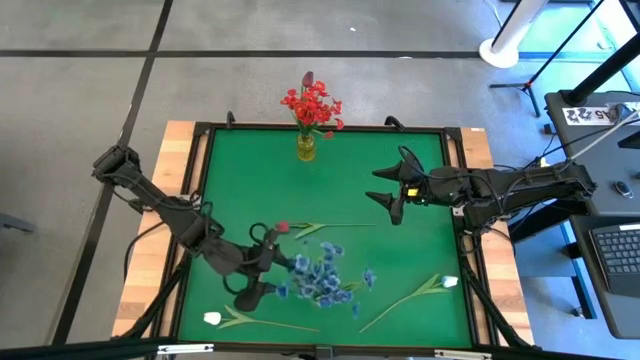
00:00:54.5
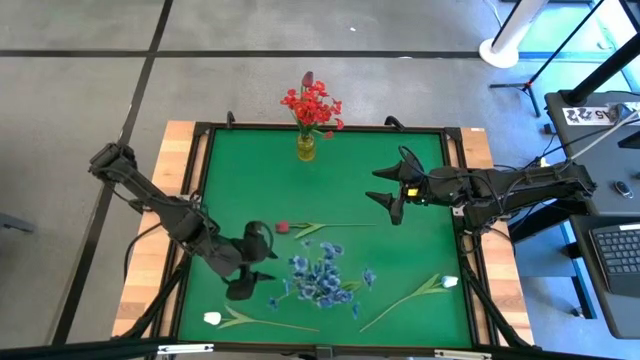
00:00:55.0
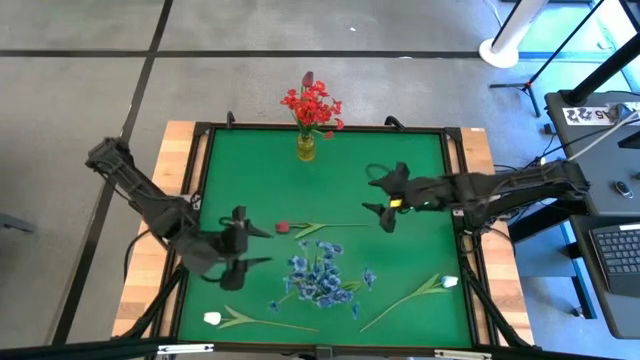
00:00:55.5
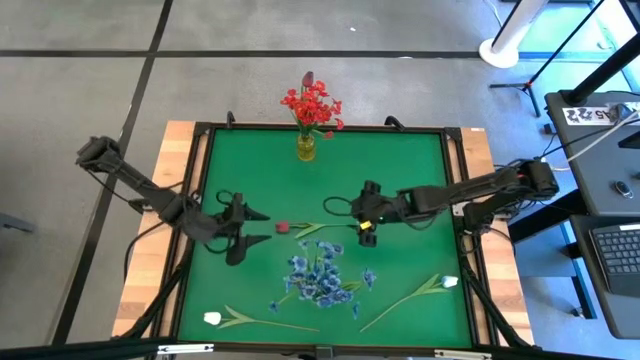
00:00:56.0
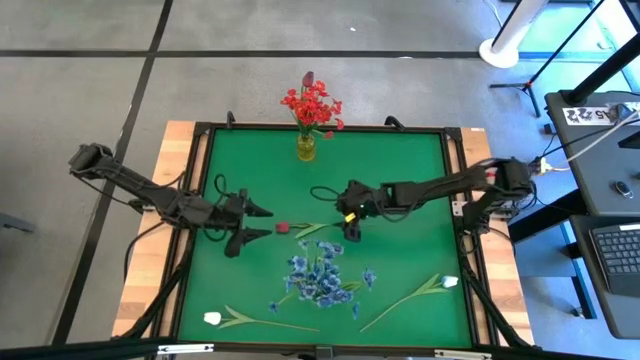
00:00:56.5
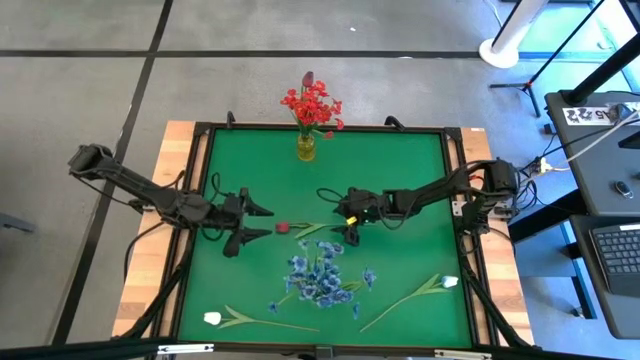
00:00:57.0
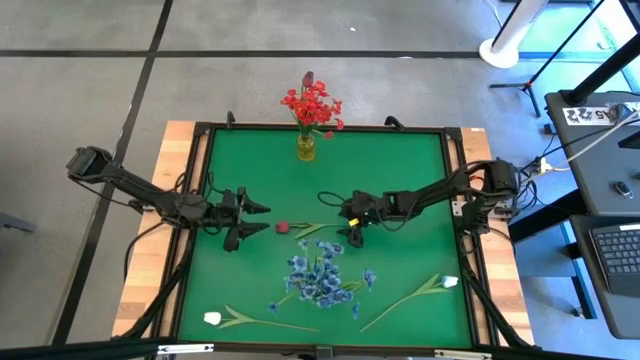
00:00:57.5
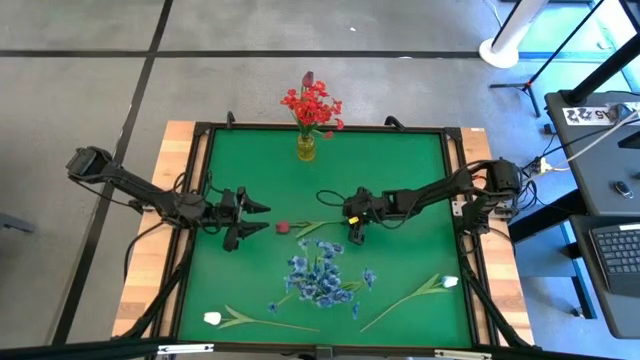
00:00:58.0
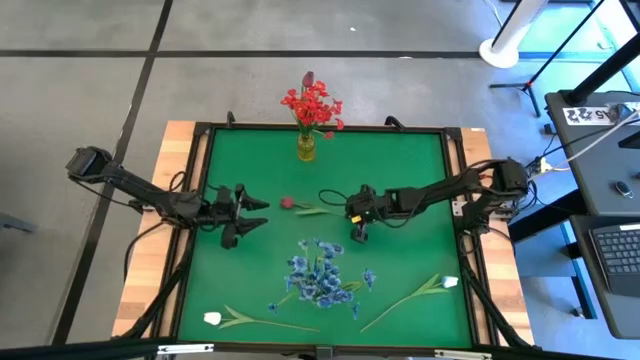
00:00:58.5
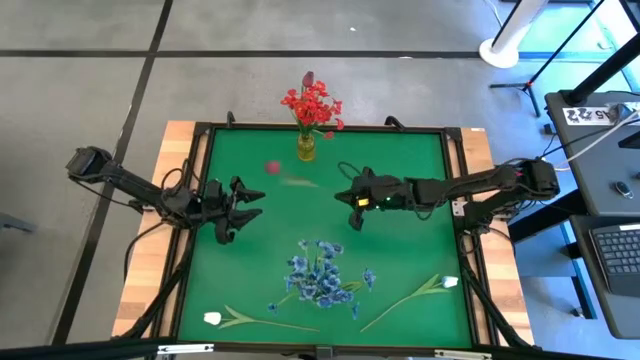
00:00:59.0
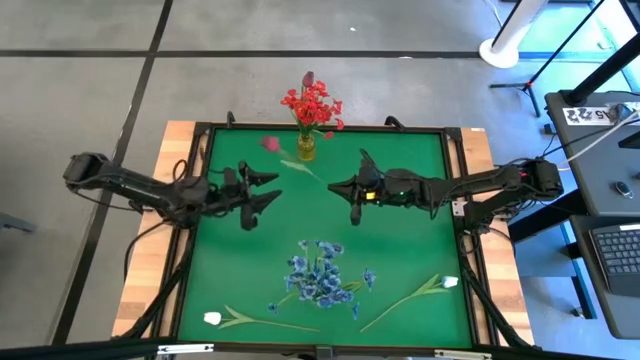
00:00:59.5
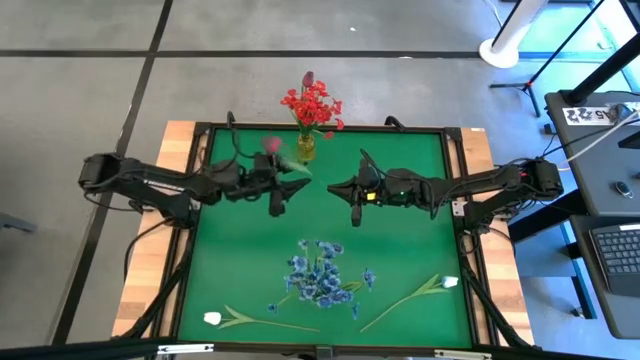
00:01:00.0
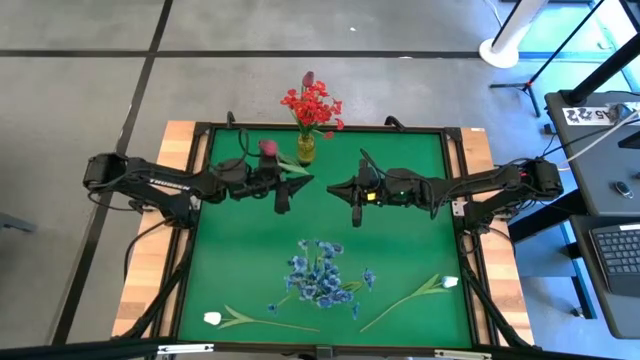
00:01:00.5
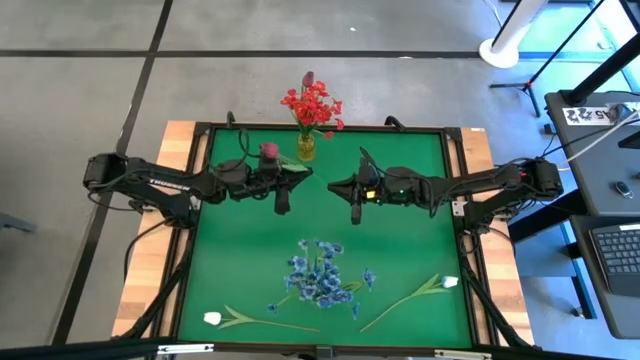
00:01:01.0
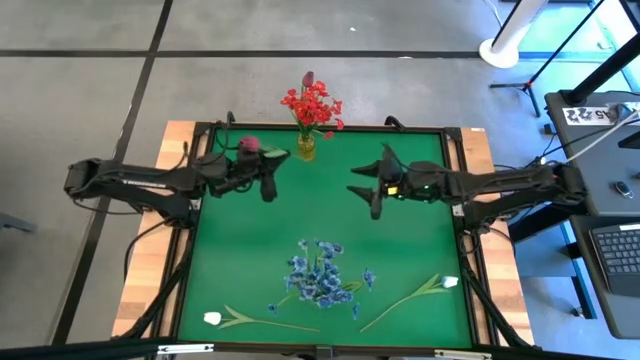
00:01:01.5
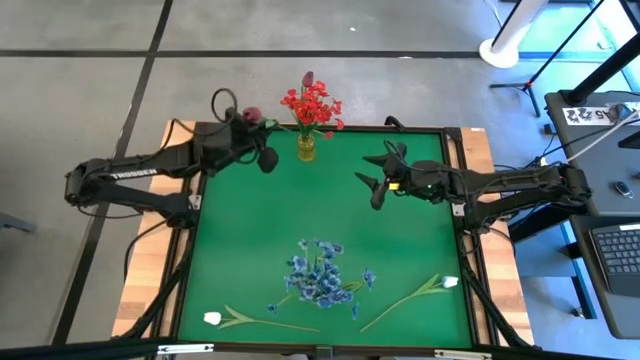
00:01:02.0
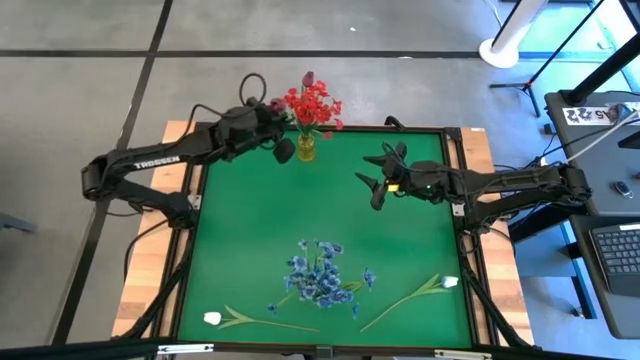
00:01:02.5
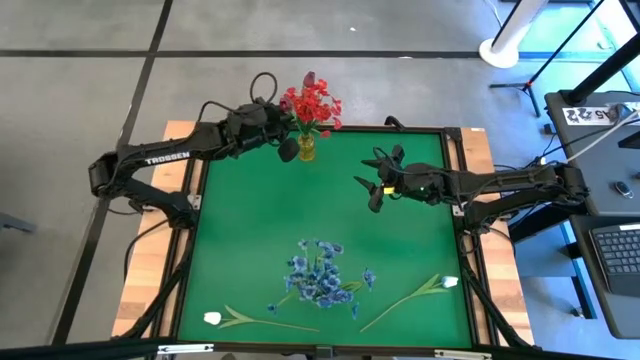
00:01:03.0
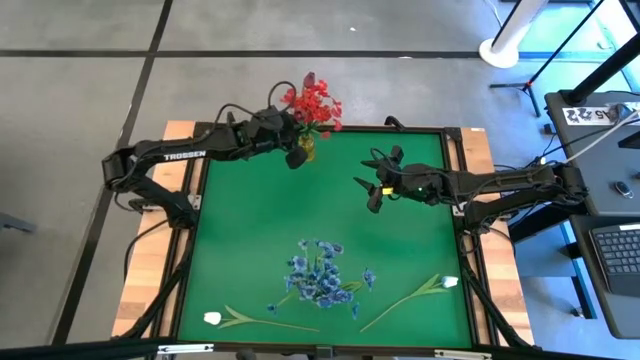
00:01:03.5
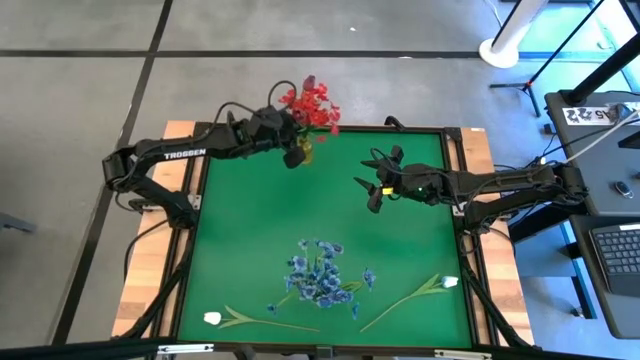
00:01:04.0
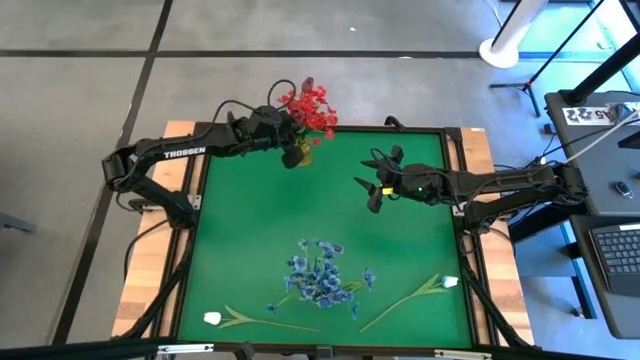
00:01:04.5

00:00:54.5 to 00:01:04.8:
Task: Sort flowers into vase by color
Put the red tulip into the yellow vase

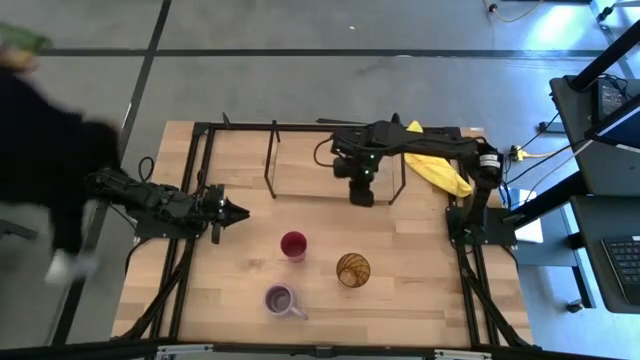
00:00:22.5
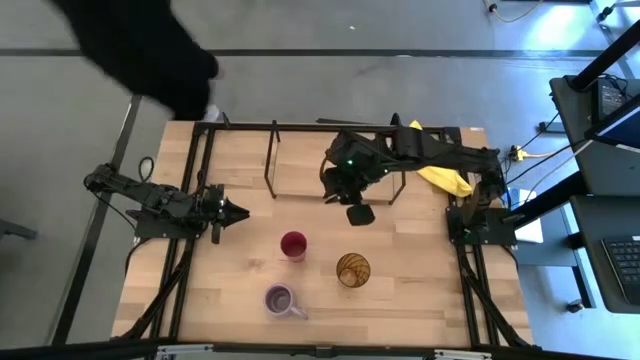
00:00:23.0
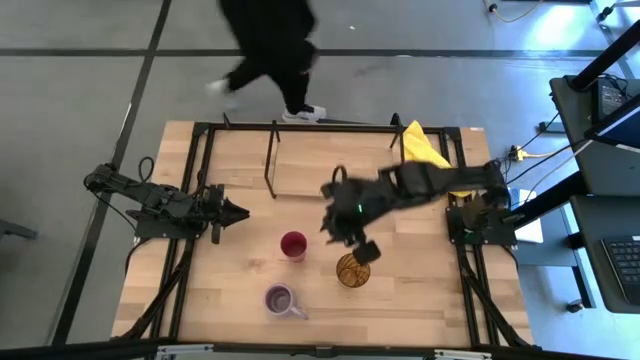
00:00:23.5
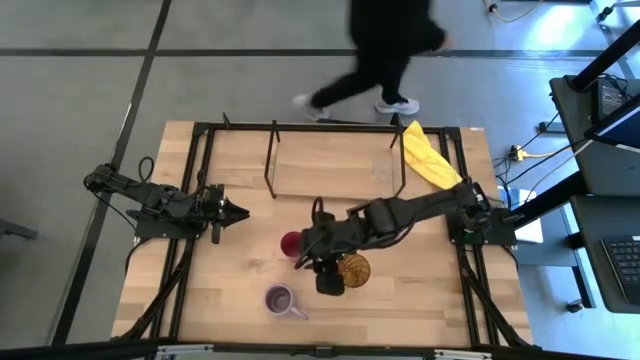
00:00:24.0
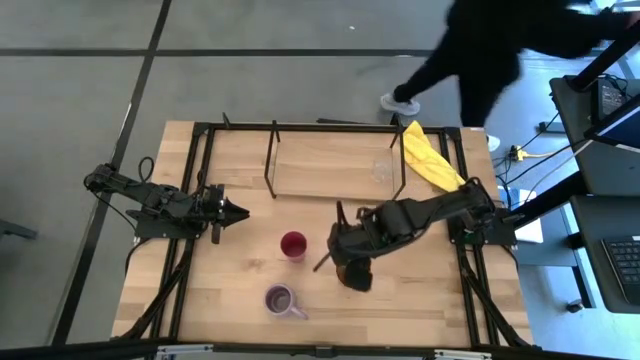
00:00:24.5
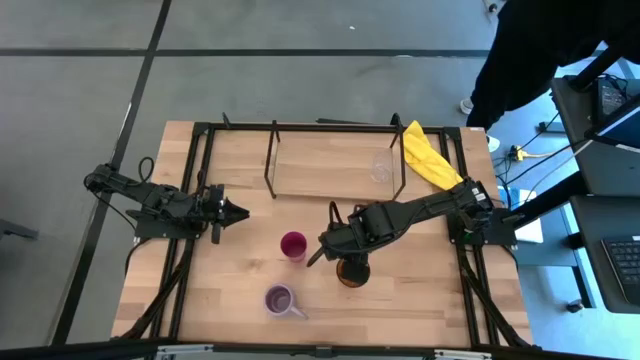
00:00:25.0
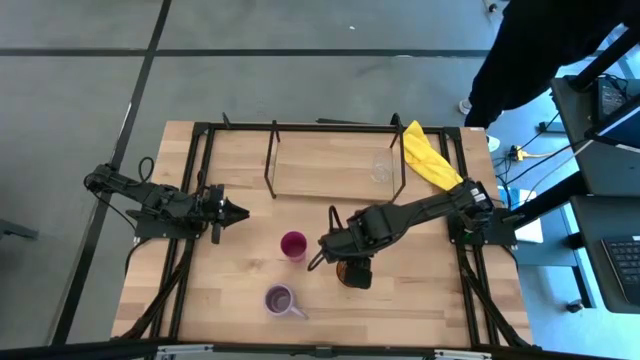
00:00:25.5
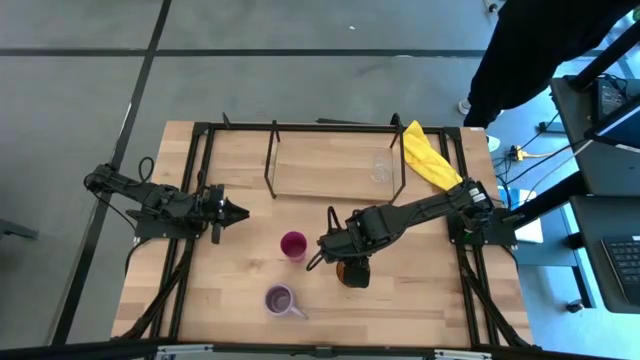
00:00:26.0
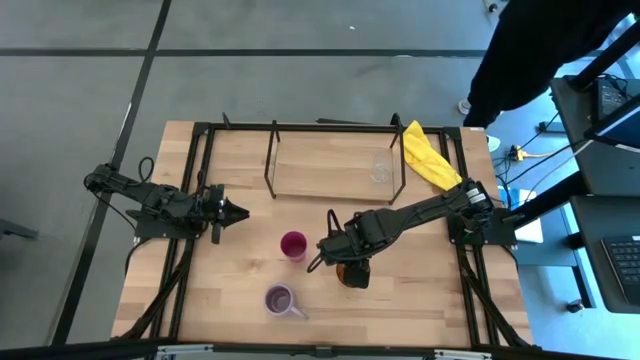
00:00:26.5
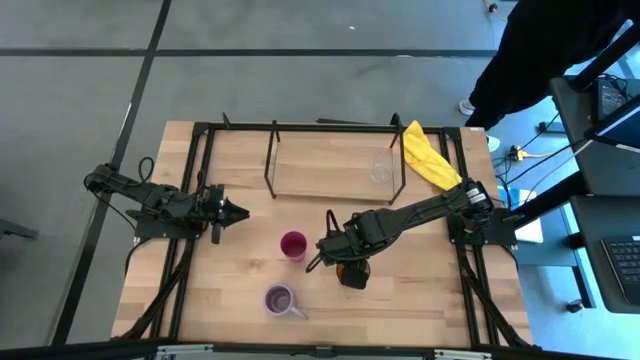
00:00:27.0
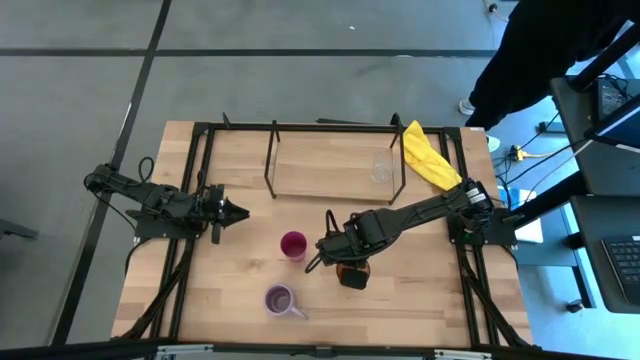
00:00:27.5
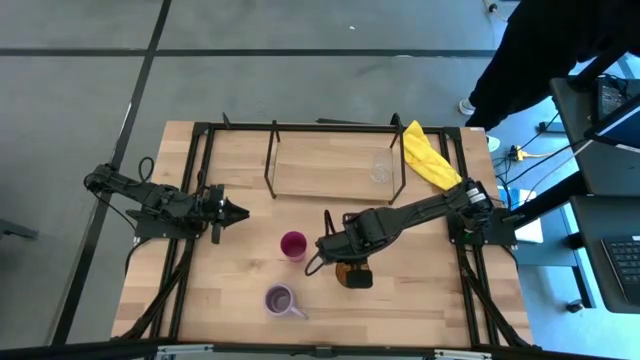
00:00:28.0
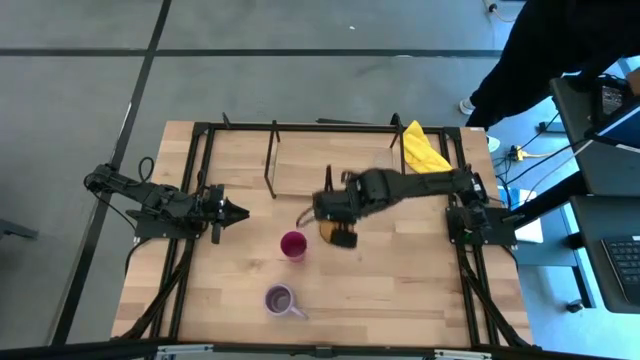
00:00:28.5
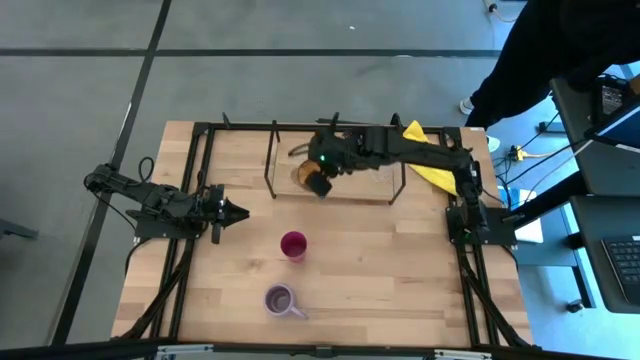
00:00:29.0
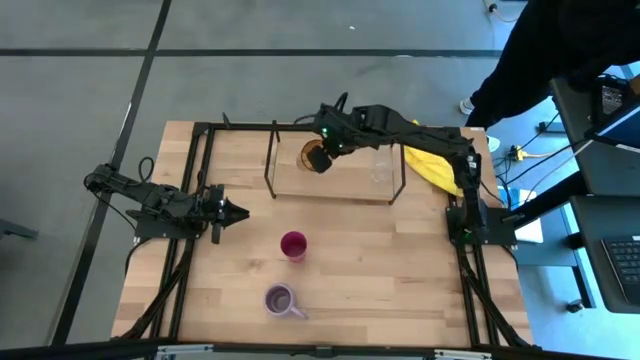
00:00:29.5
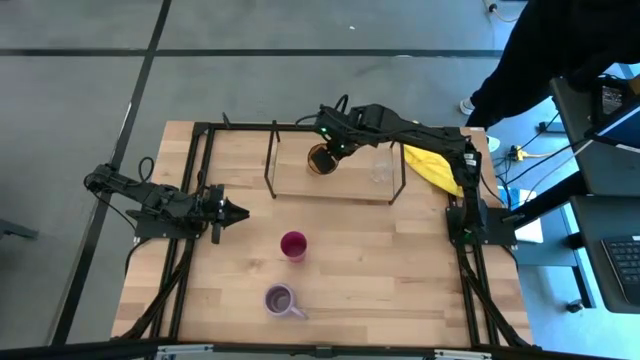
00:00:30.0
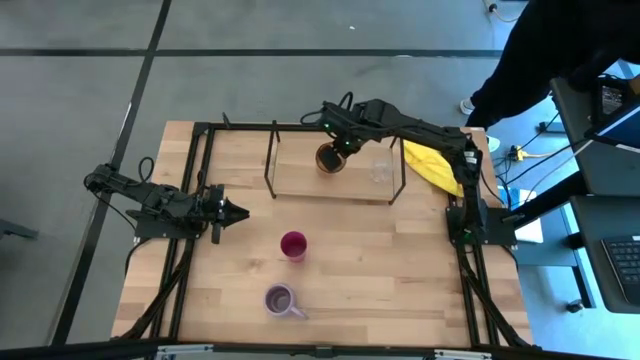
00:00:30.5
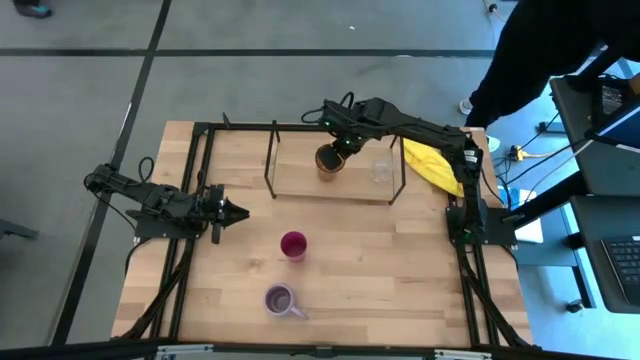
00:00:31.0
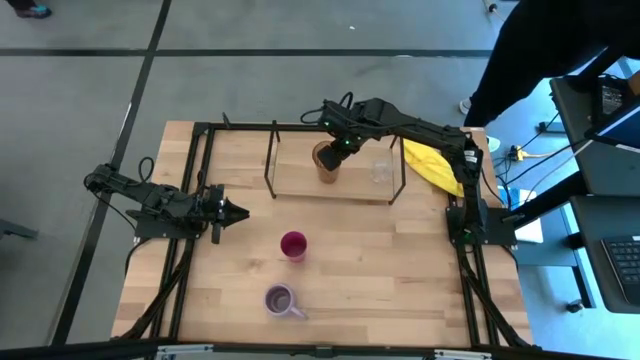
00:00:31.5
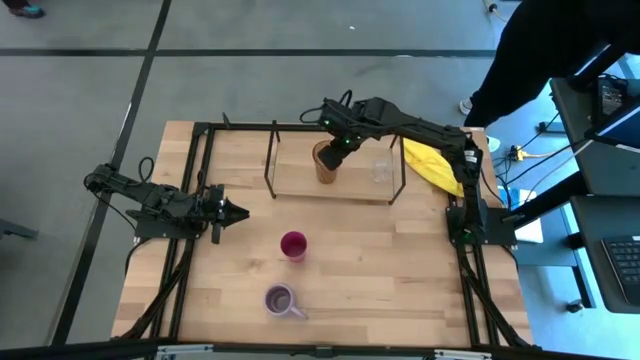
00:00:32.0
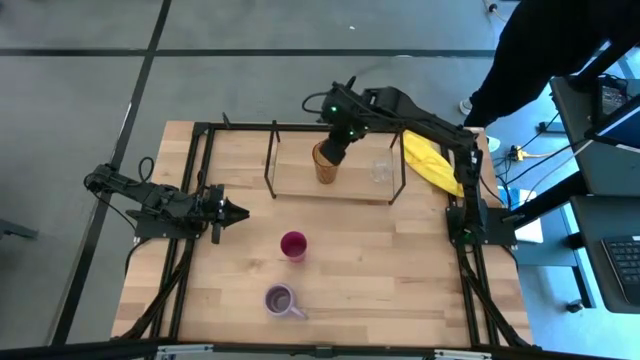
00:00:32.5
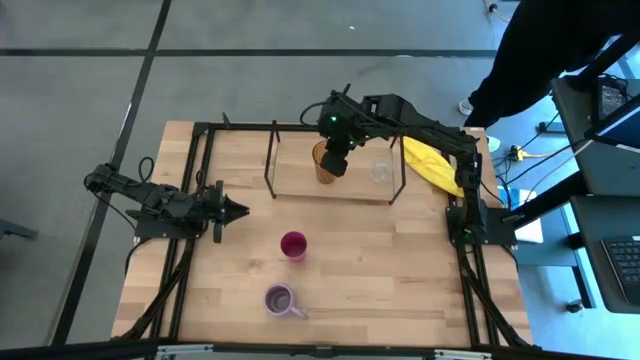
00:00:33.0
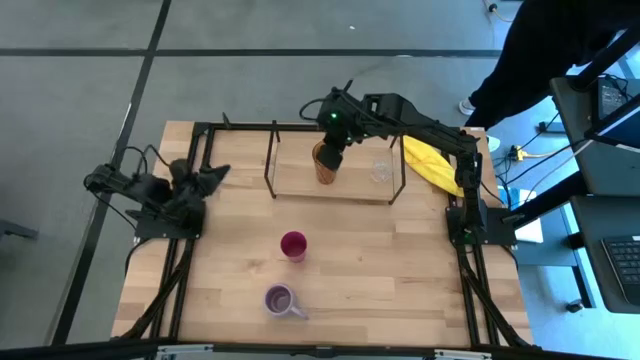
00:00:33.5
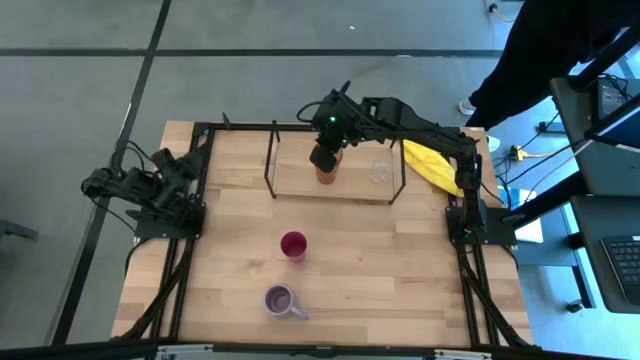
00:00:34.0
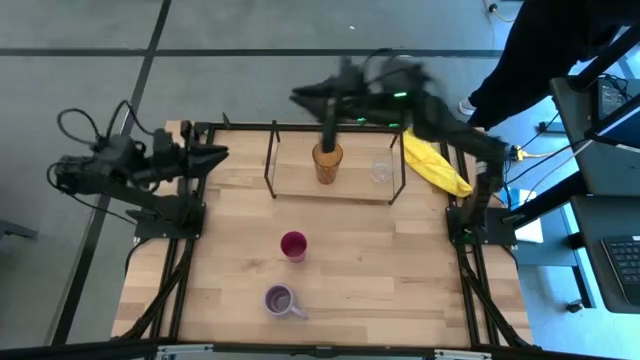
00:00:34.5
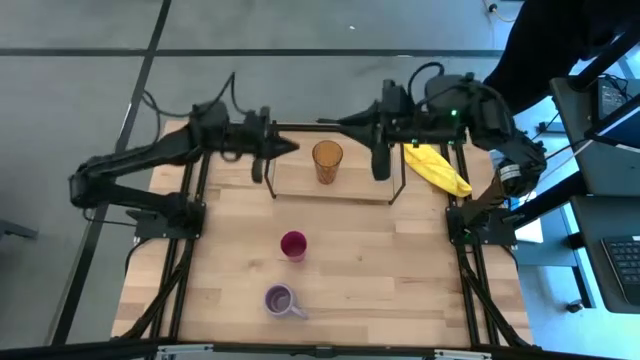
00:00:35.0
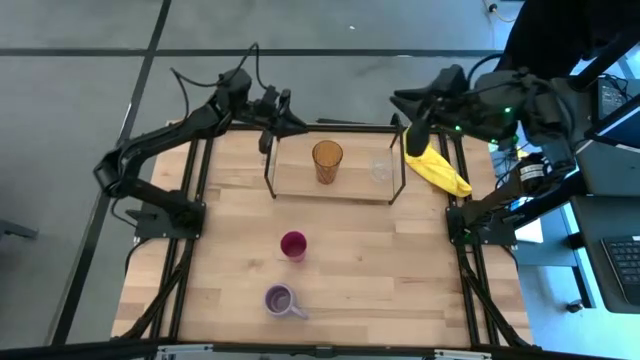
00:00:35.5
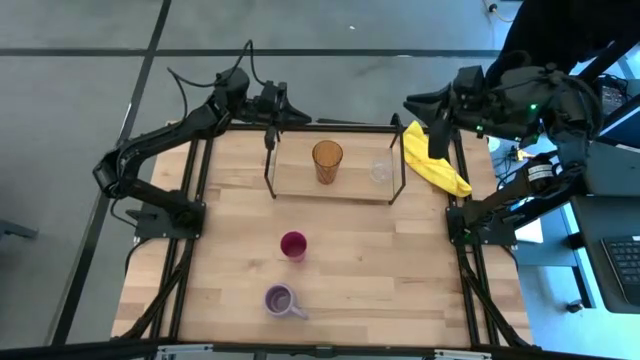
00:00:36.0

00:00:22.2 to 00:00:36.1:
Task: Stack small to large cups/mugs on shelf
Put the brown cup on the shelf
